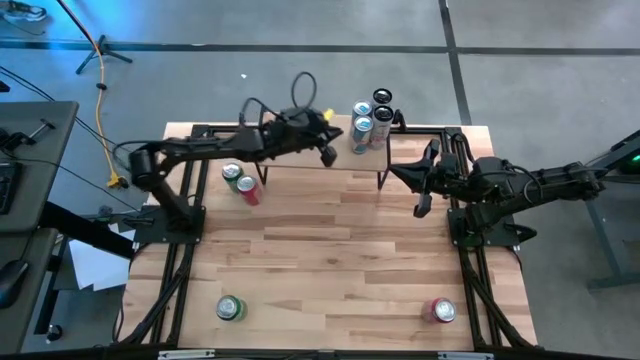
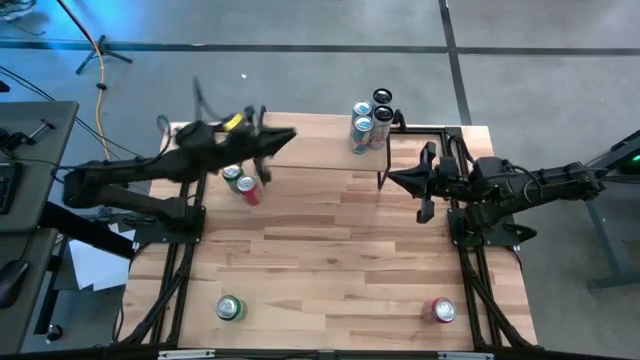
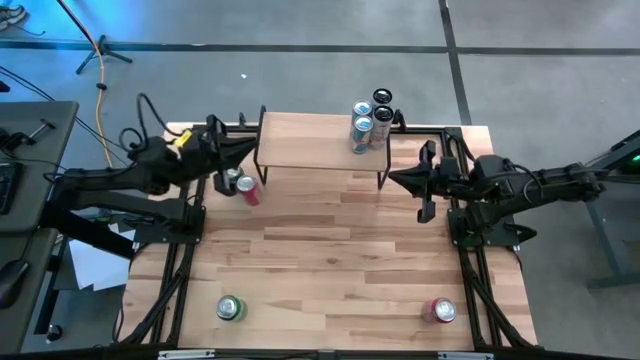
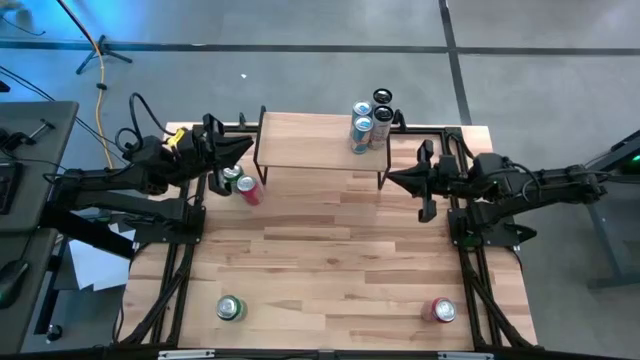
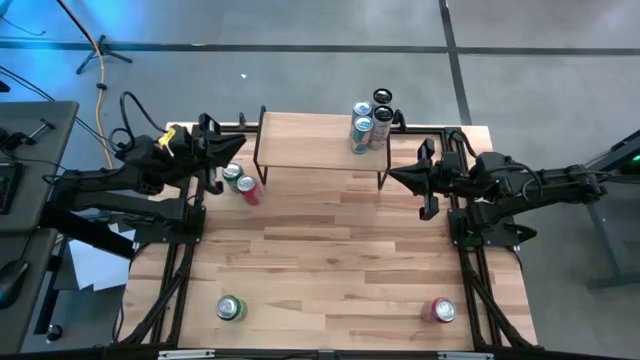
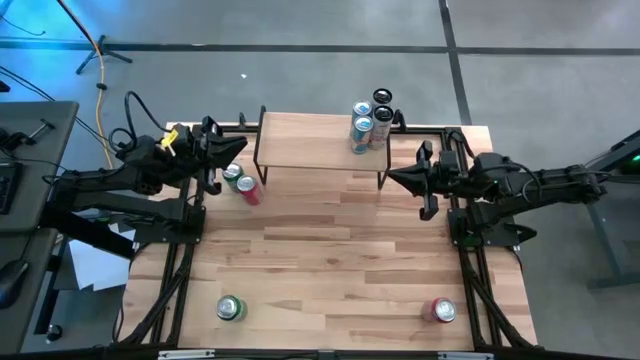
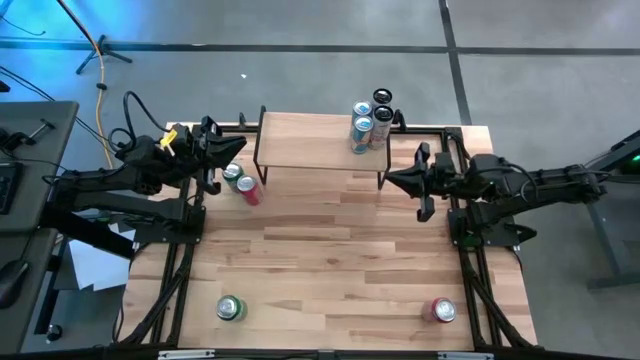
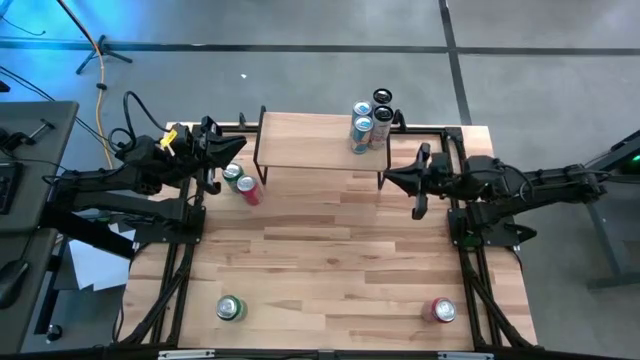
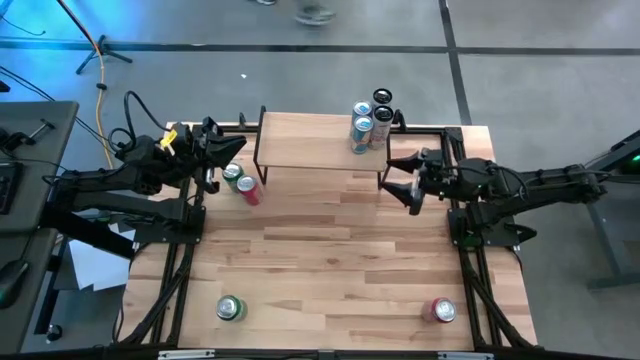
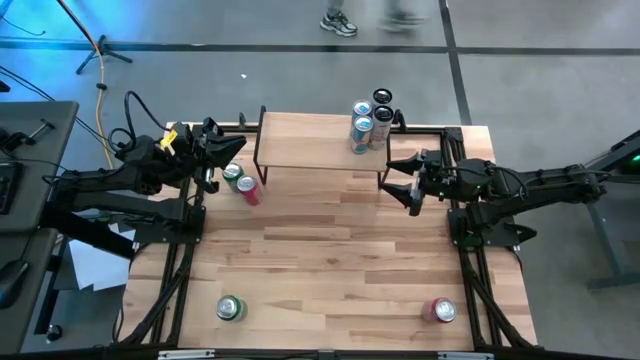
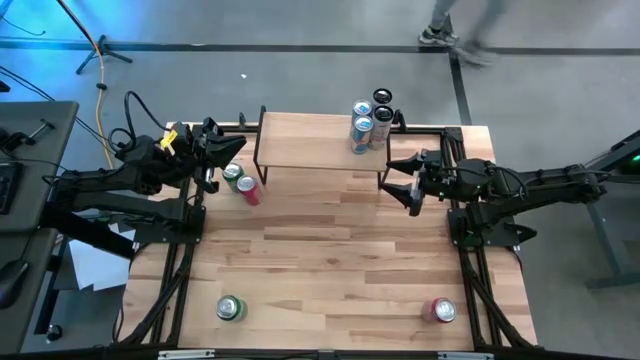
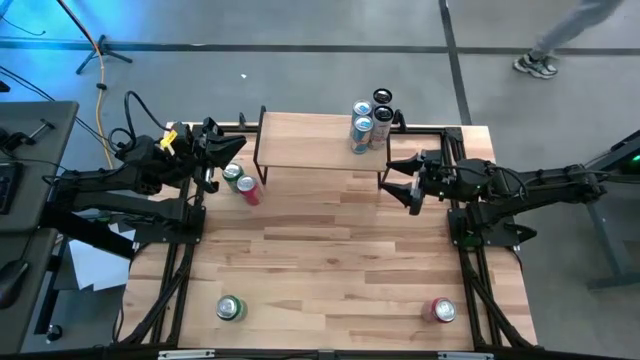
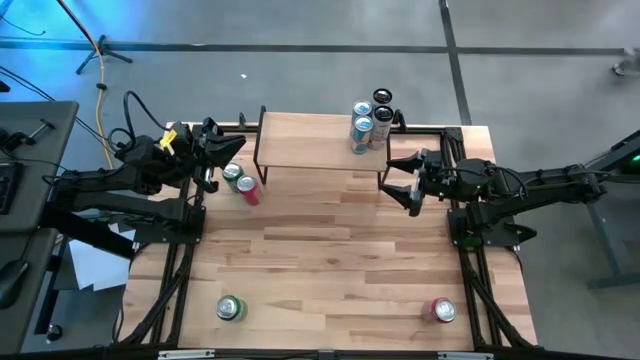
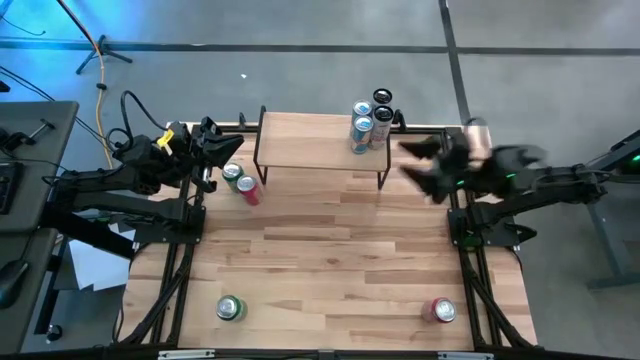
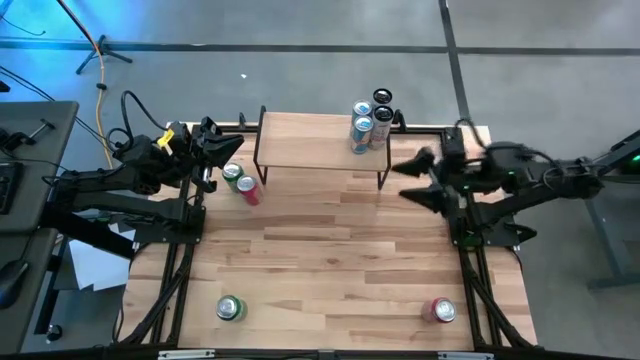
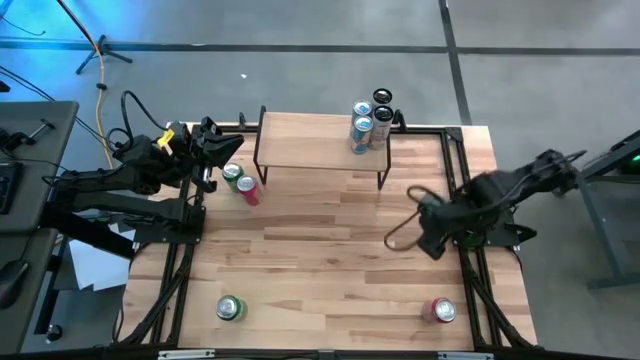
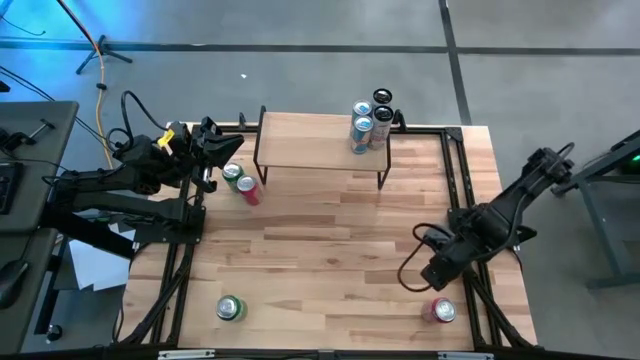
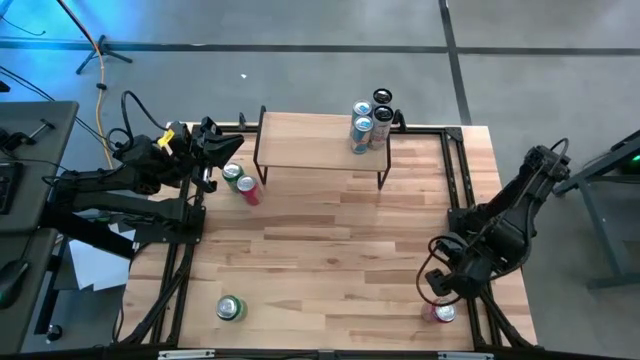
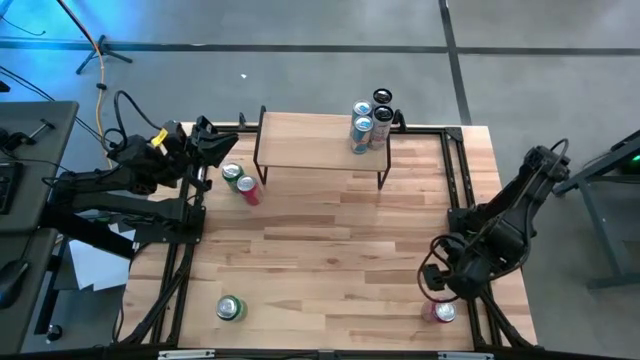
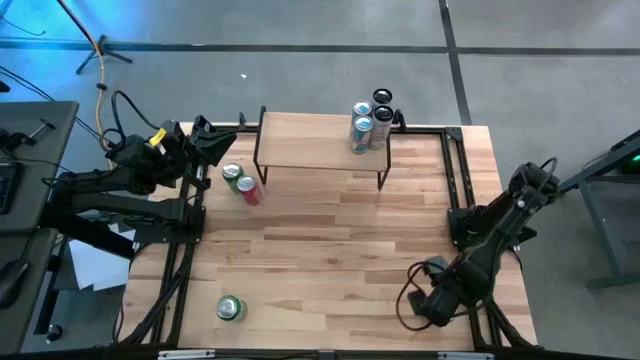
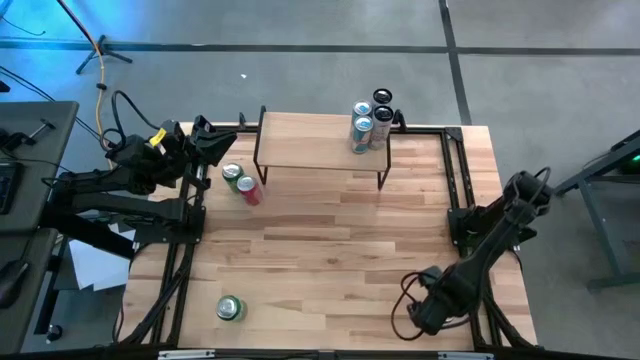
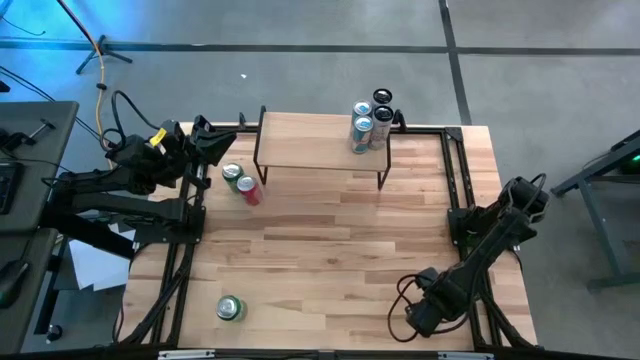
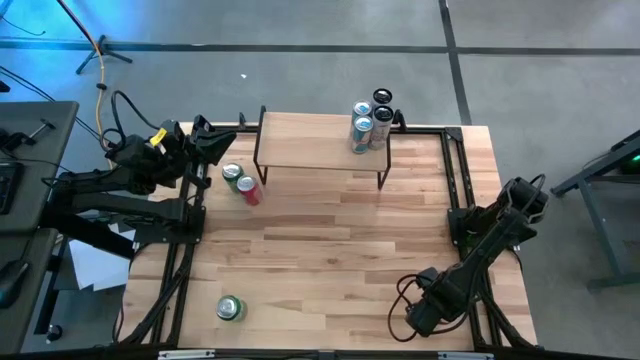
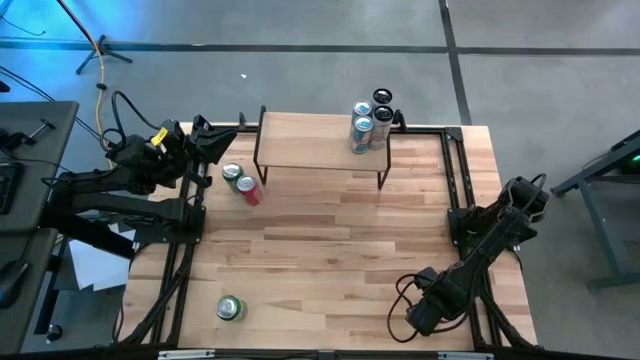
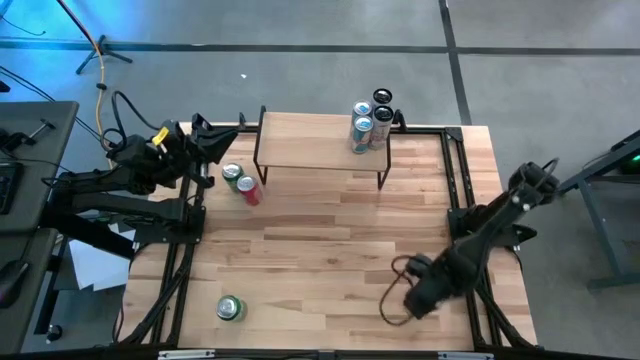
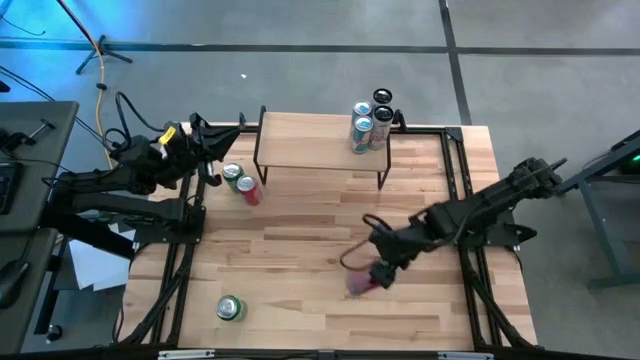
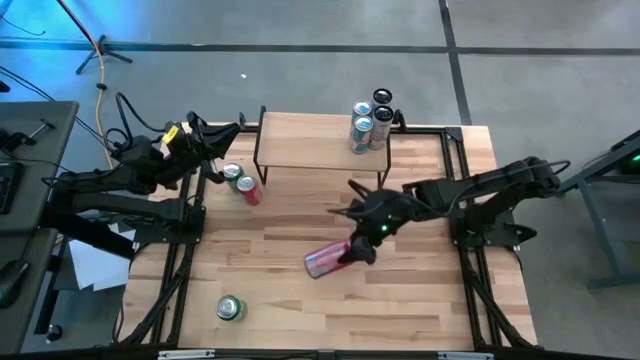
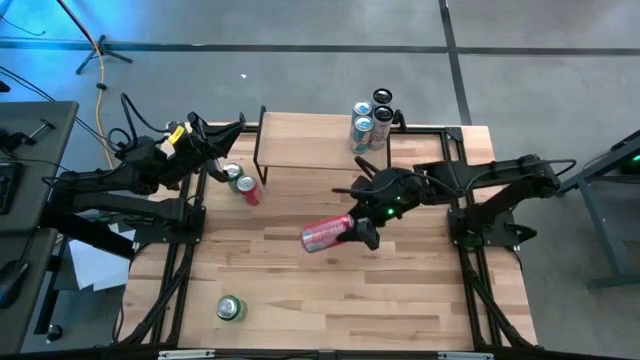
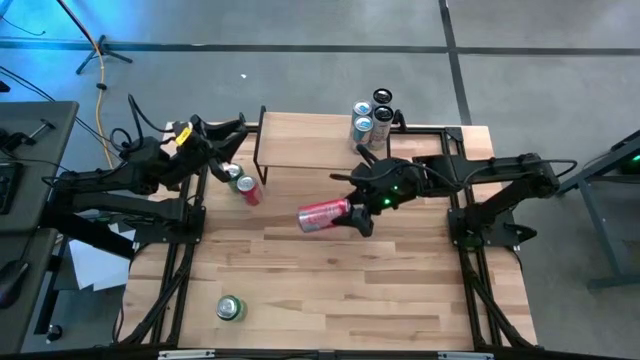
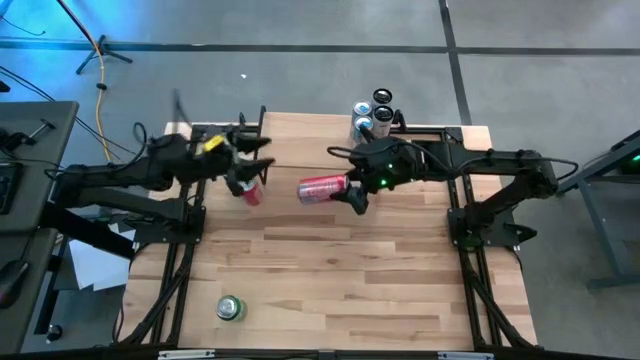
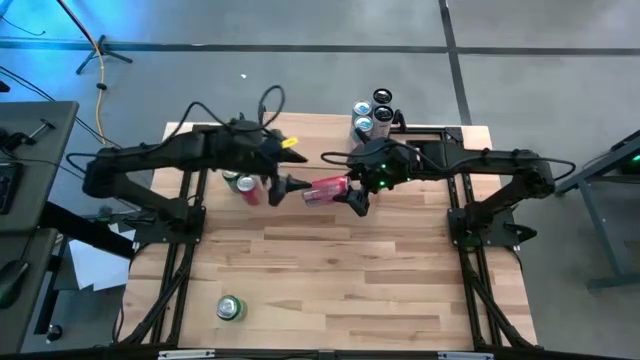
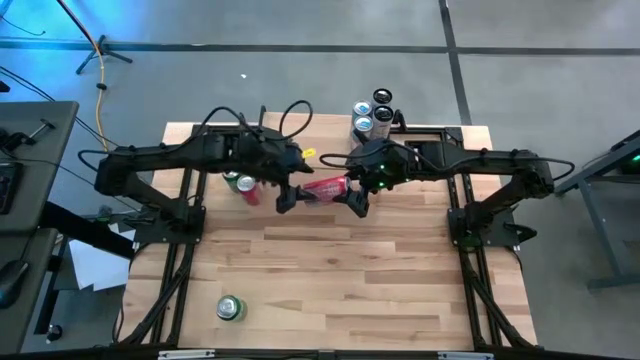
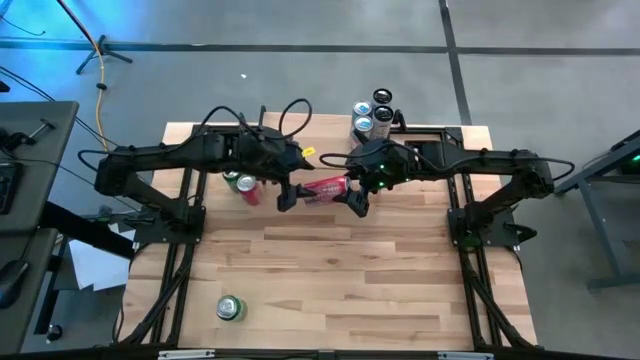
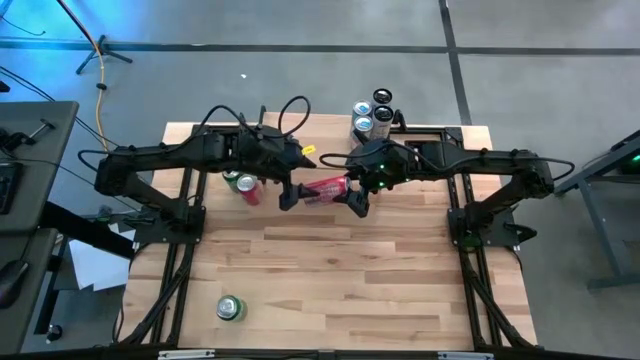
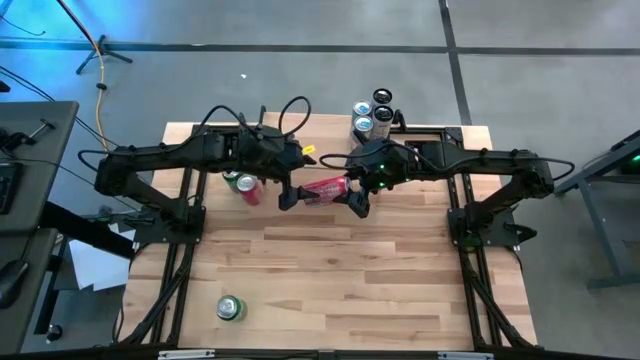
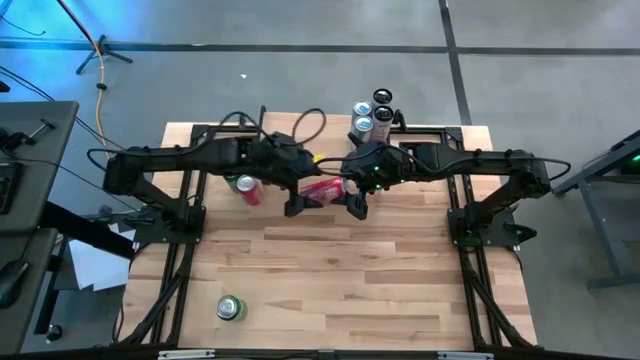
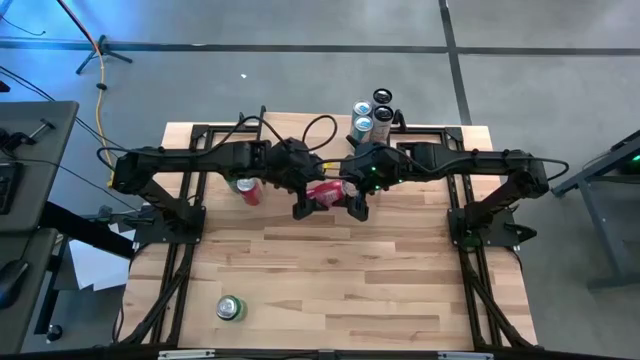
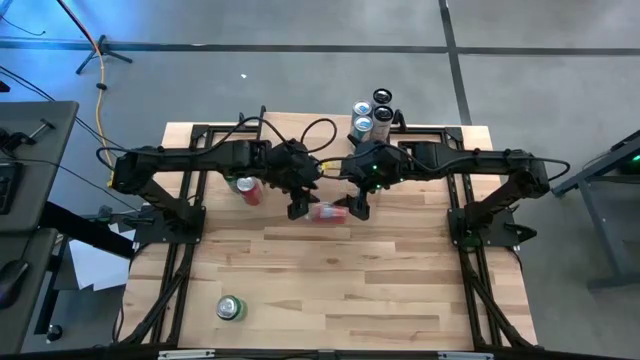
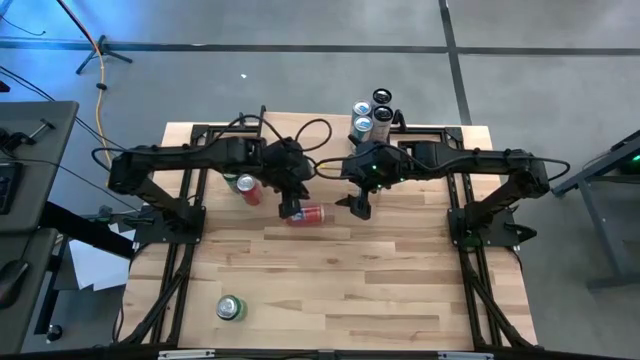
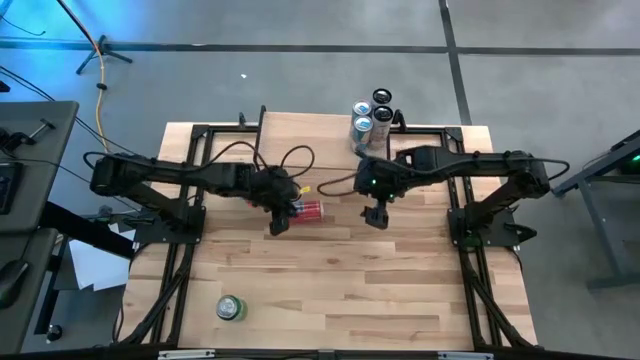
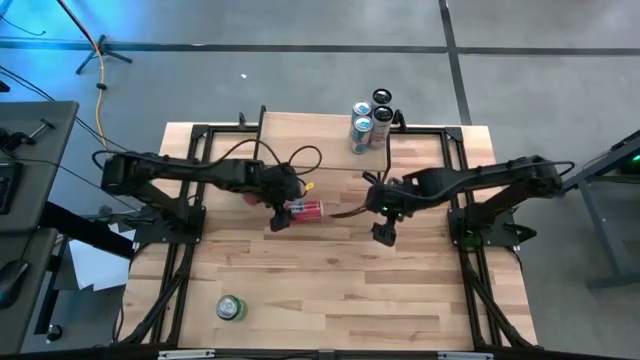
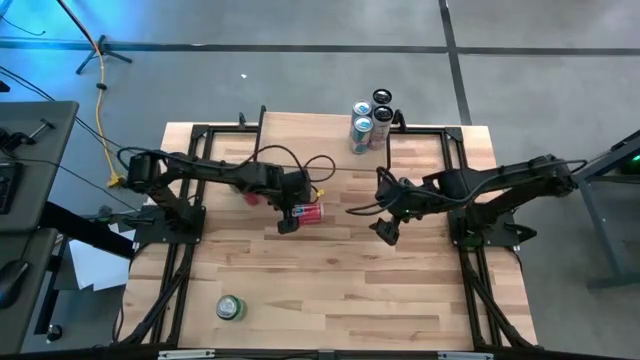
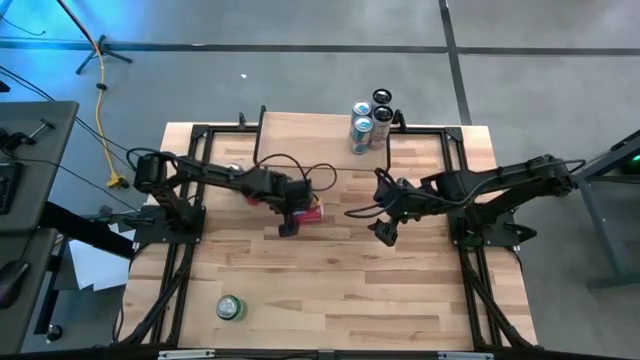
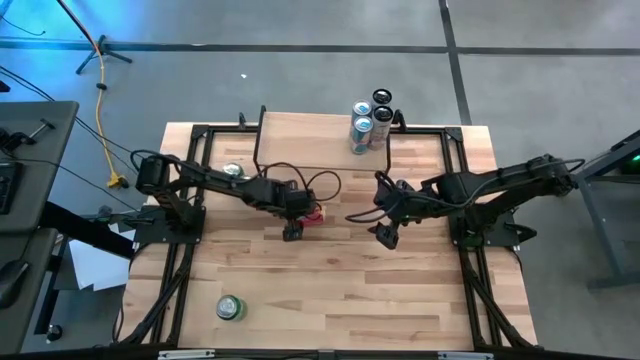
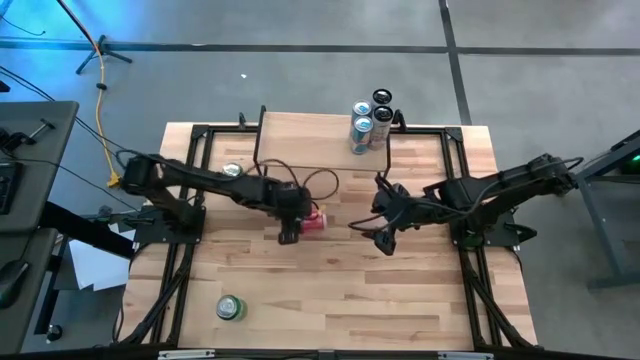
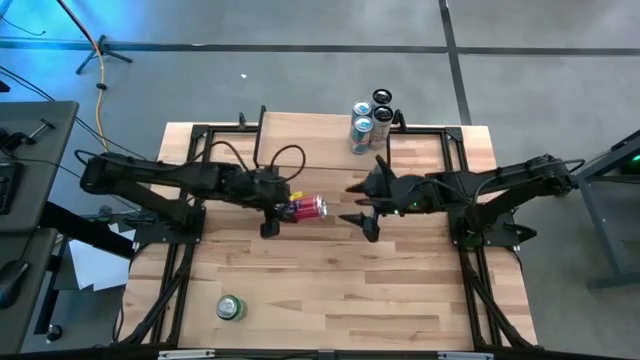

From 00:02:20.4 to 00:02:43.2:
Task: Place canned beverage on shelf
Put the bottom red soda can on the shelf
